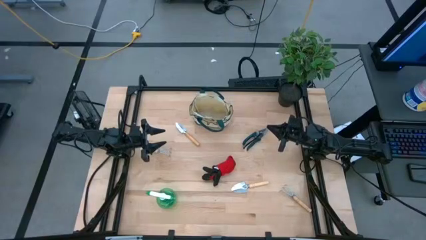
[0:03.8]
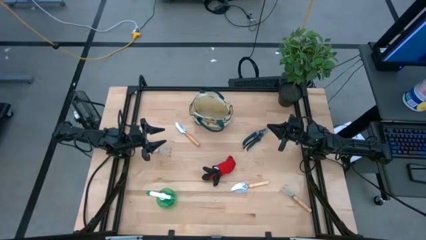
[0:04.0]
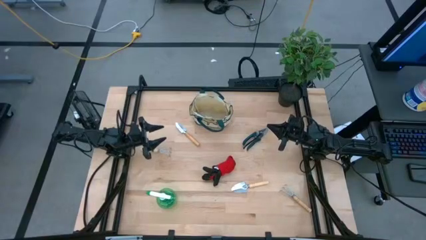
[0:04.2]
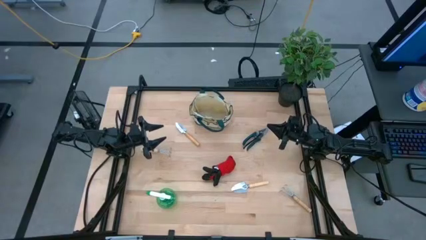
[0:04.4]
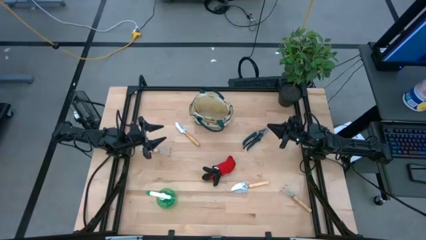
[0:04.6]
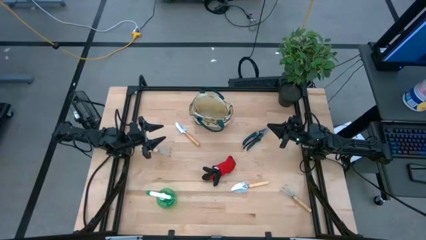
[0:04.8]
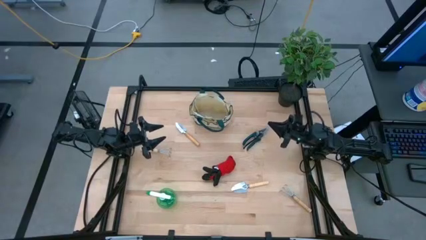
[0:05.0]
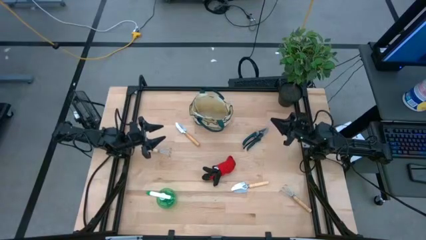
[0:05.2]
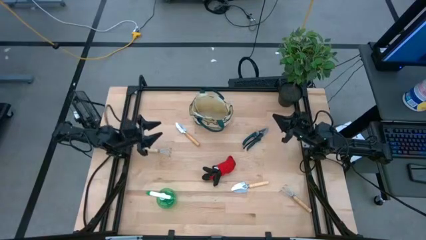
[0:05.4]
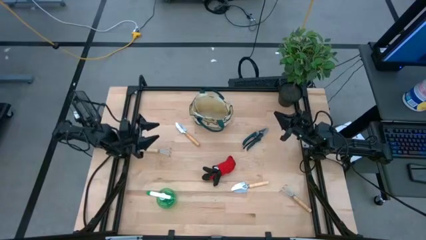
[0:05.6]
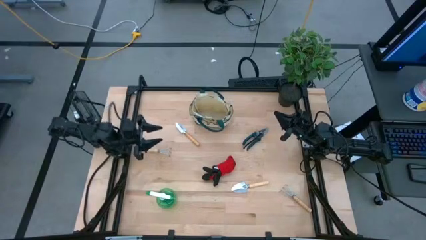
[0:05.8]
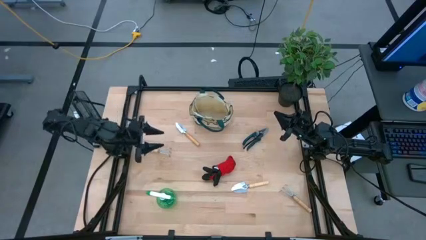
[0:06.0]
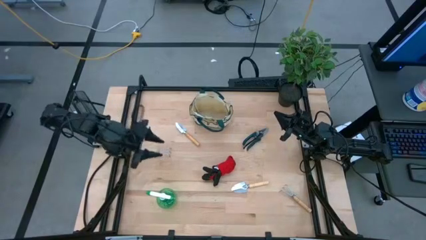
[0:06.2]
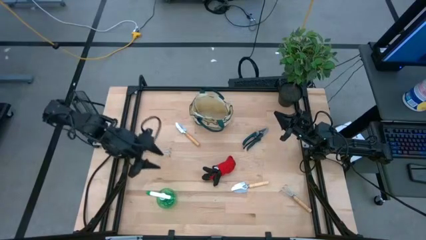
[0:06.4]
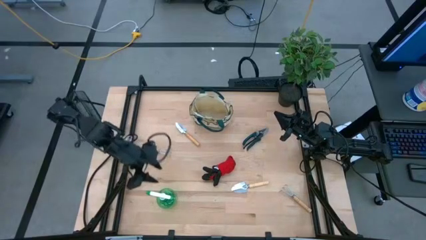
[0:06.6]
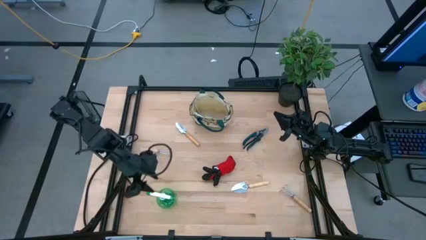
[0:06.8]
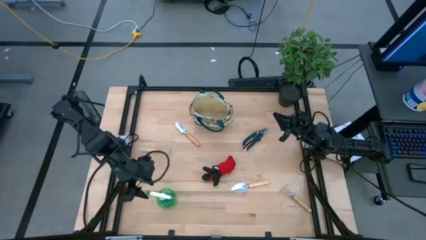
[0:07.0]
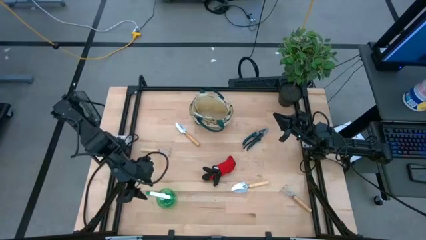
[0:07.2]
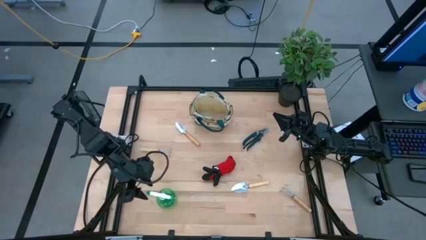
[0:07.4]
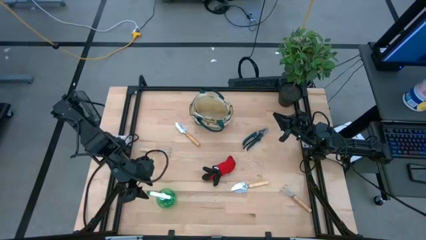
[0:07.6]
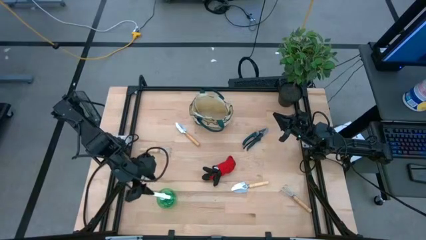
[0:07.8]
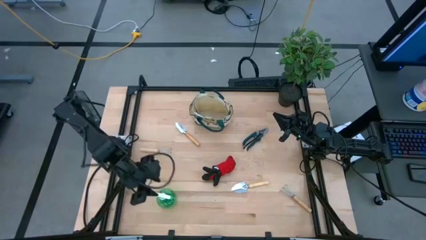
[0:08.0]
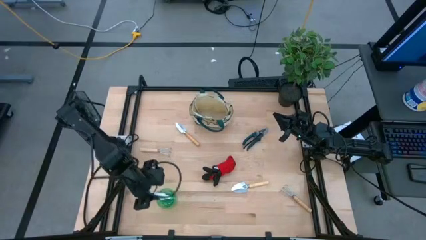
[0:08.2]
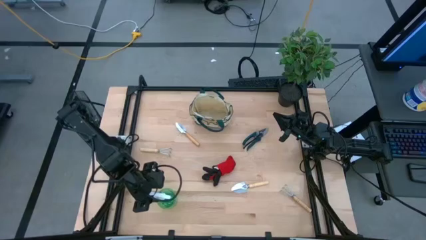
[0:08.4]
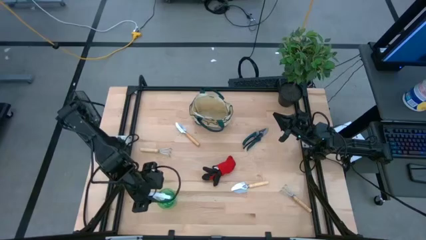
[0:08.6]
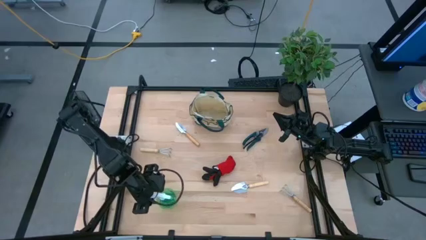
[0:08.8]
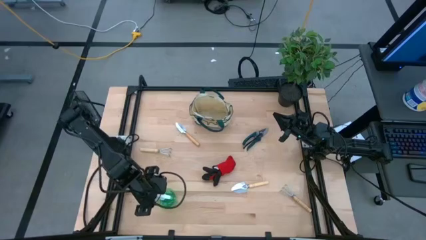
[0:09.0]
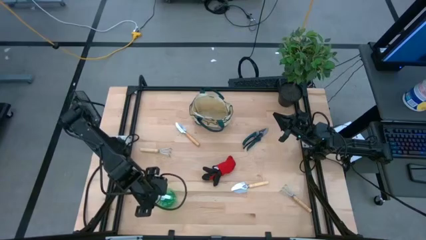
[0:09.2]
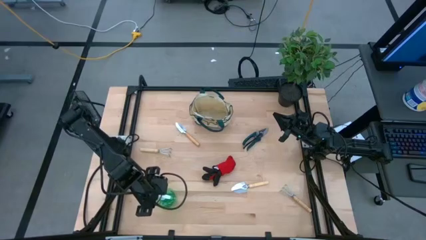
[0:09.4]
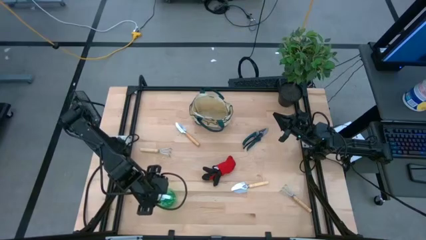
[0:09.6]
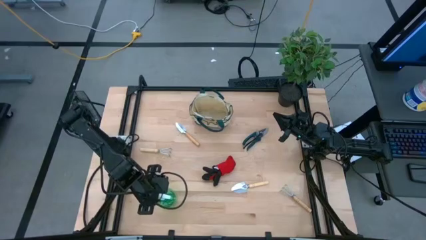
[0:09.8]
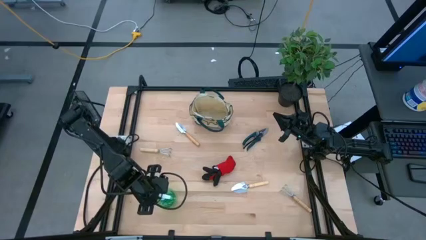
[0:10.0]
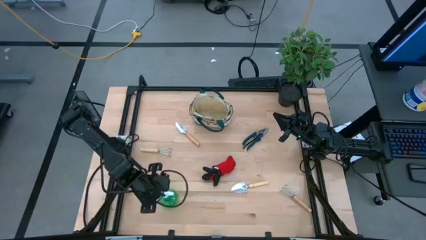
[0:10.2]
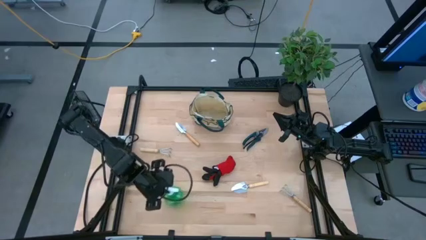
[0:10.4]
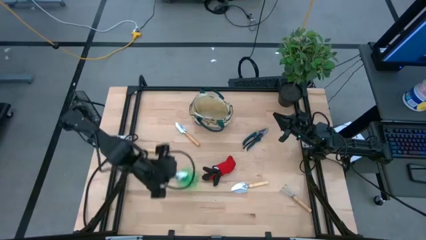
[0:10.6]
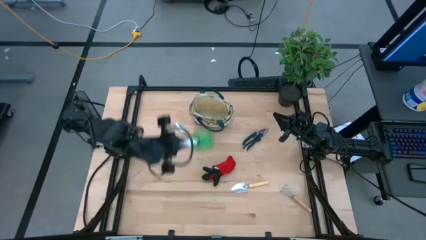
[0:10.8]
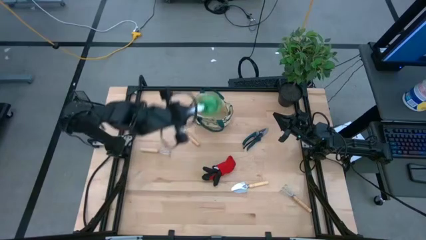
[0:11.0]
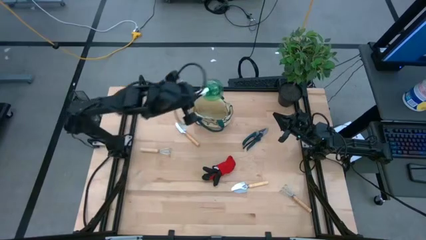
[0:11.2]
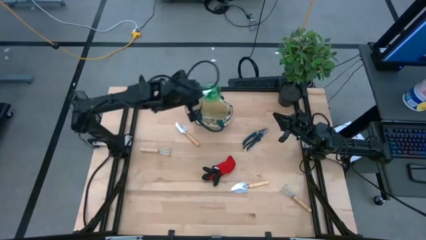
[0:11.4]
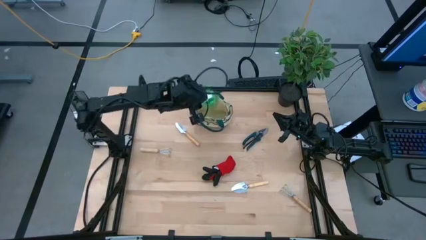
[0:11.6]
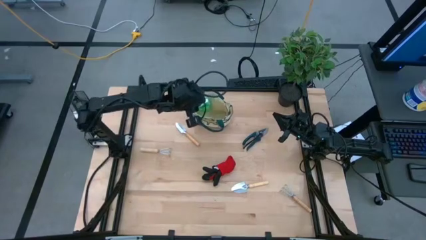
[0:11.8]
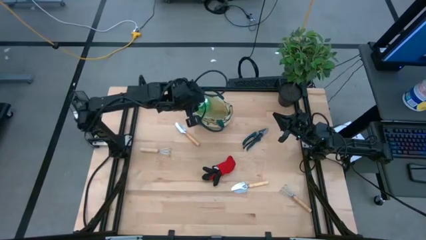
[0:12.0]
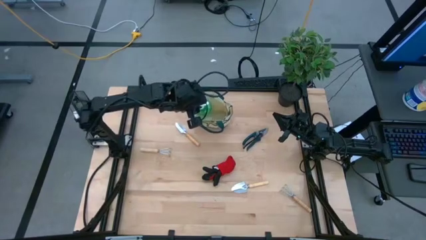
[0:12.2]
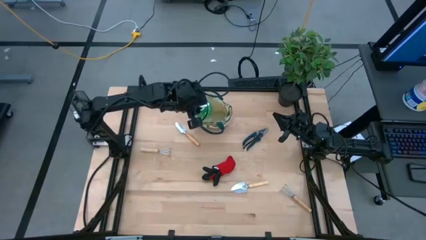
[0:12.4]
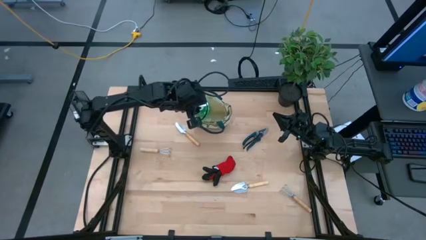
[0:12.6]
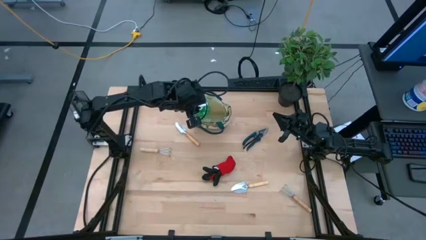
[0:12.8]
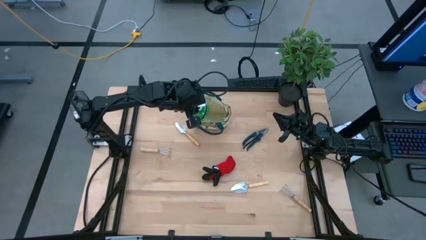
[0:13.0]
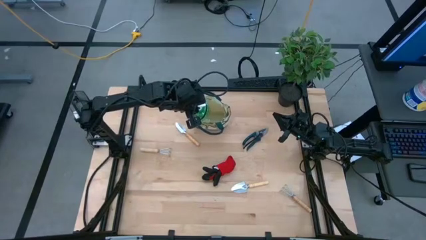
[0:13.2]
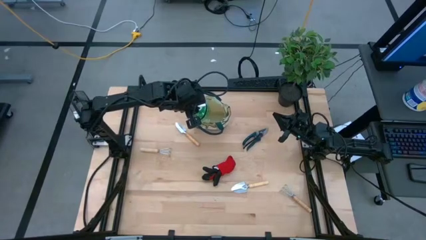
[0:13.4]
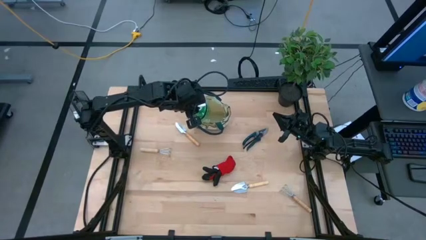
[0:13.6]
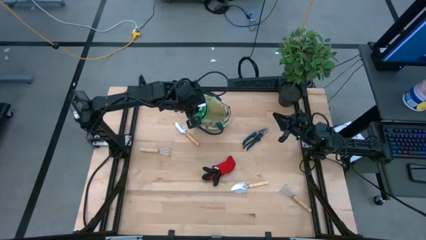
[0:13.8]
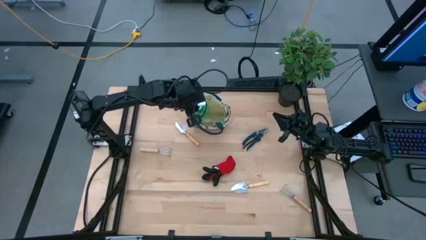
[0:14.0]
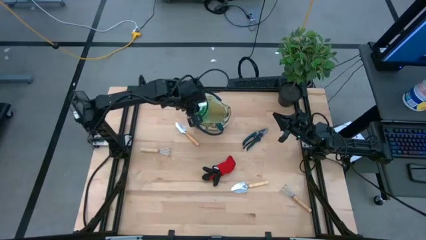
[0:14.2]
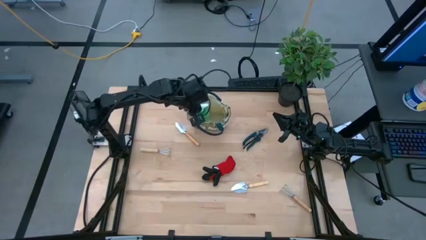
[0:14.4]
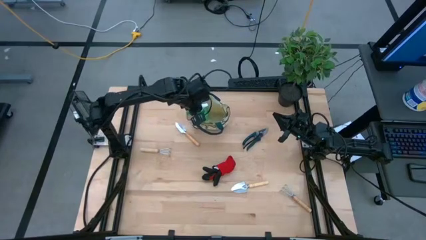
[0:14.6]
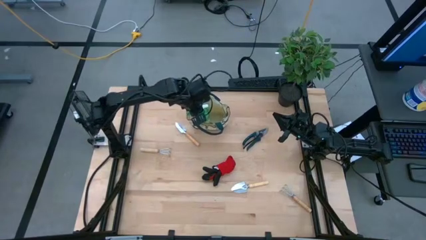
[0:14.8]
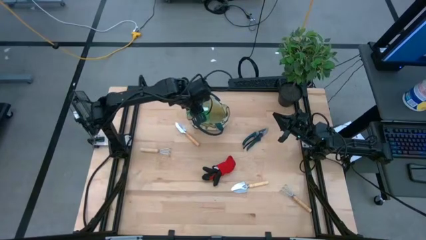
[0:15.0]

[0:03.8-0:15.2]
Task: Pick & Place Garden tools in Gardening bag
Put the green spray bottle into the gardening bag

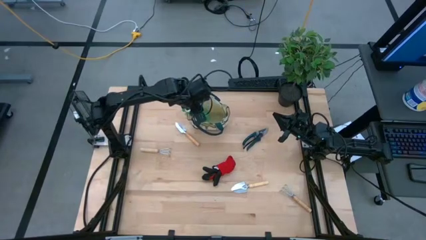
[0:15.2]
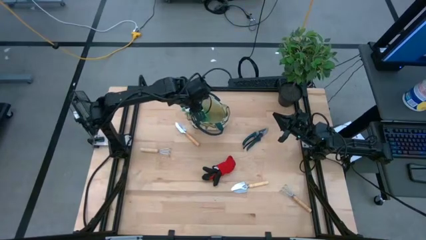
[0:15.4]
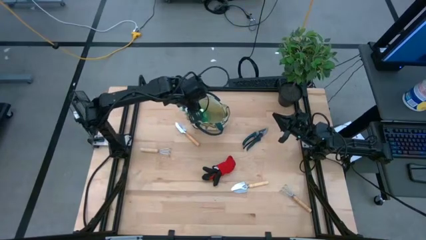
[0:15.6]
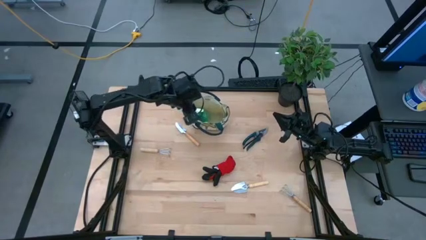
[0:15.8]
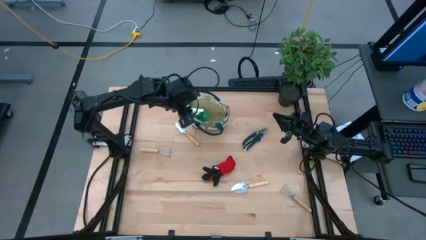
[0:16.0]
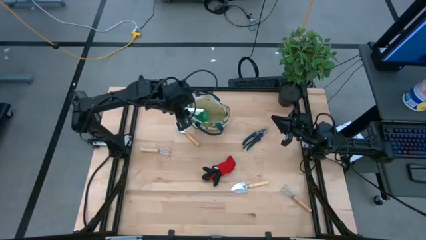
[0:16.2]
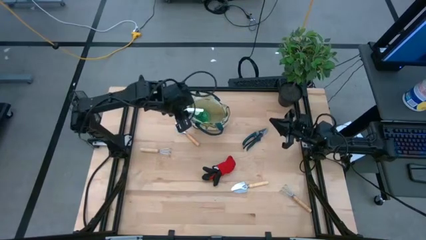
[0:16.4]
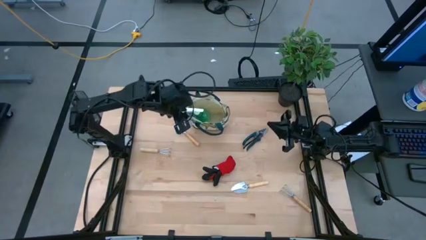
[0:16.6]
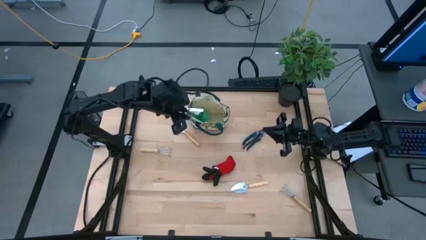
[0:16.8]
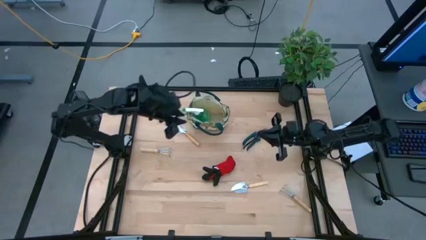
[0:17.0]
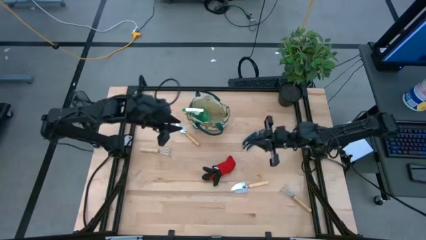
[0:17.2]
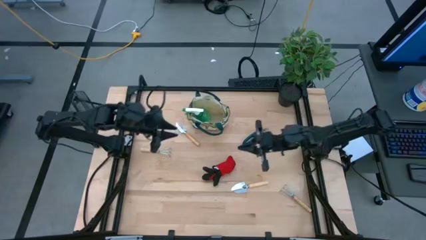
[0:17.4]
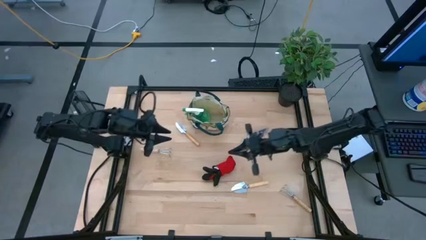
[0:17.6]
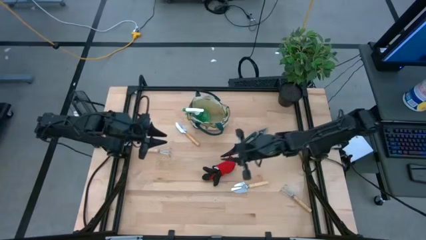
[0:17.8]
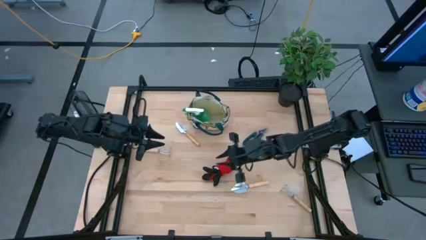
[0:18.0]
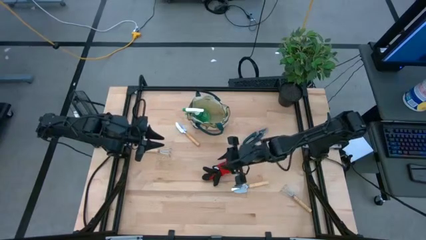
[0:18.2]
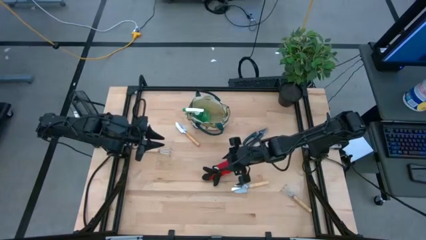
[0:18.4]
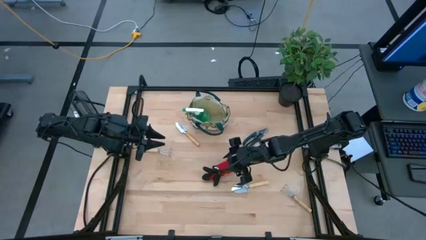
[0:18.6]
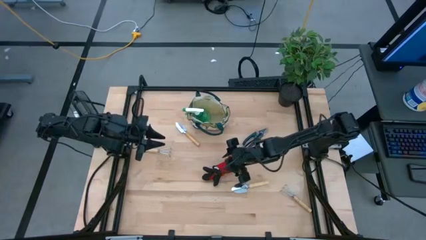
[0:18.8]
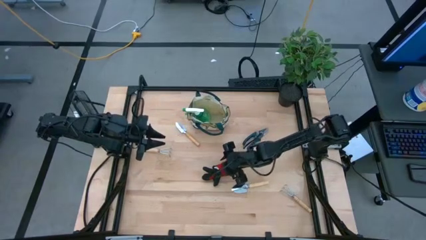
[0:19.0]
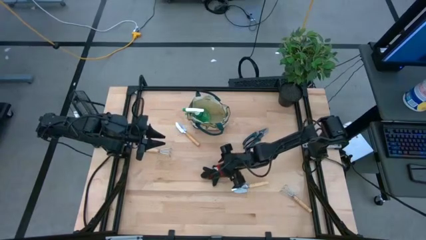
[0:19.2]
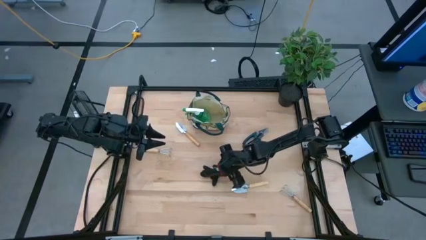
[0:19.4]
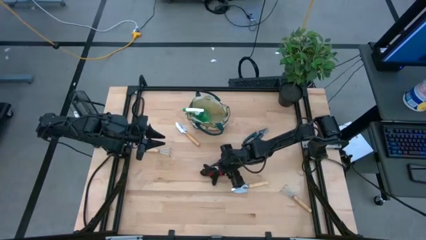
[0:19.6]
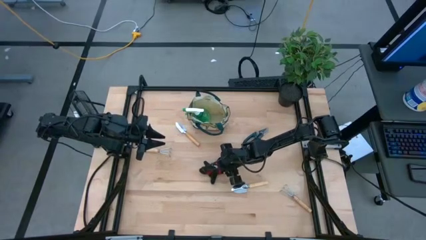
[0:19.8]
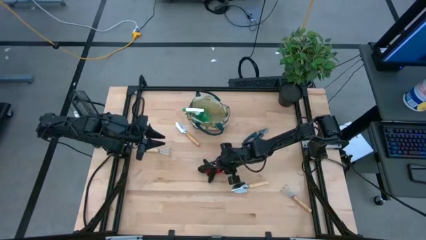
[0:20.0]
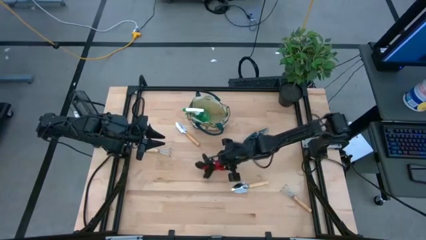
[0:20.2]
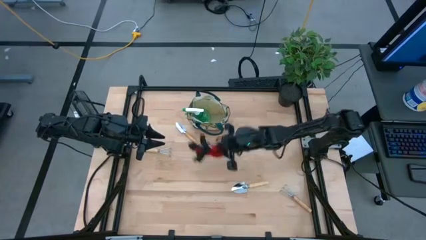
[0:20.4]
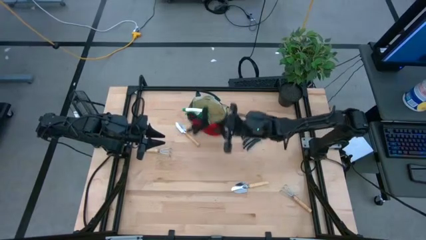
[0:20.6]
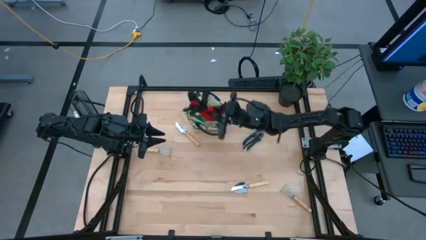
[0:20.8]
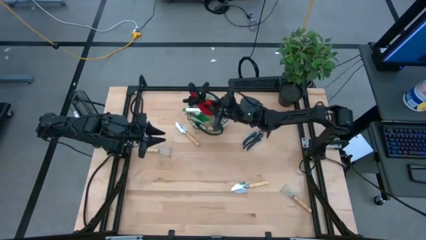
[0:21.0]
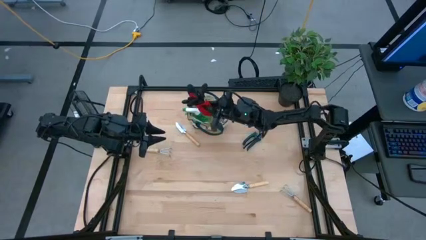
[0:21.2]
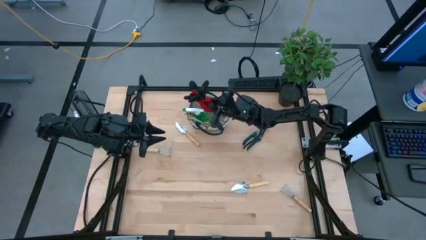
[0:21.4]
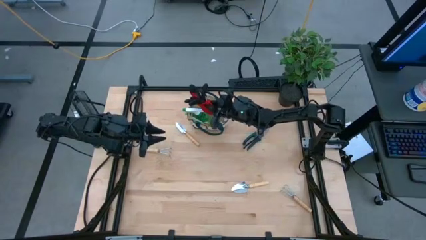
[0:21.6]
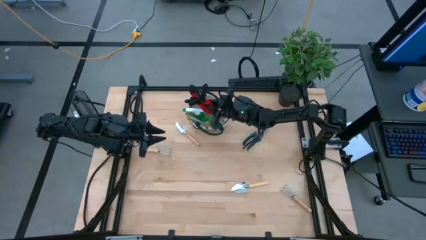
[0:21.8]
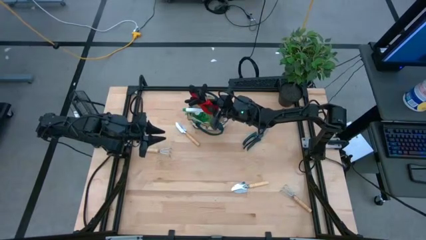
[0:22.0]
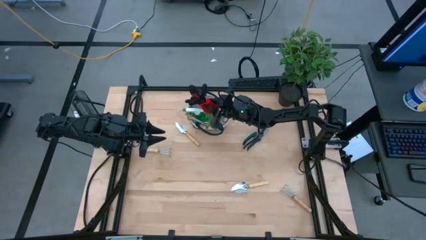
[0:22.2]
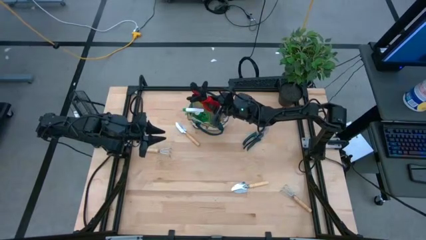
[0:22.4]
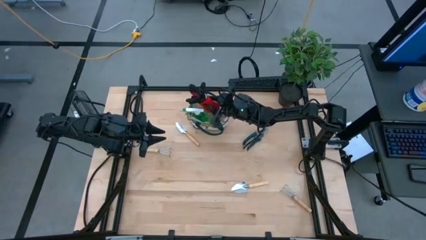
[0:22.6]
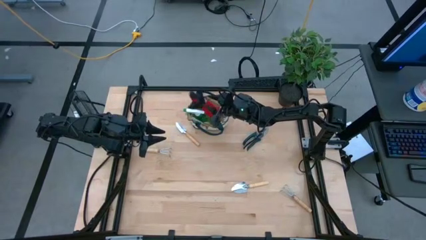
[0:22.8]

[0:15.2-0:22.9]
Put the red gloves into the gardening bag
